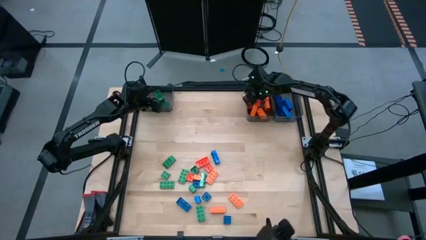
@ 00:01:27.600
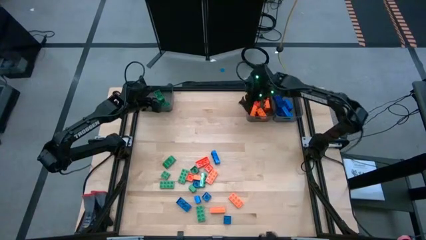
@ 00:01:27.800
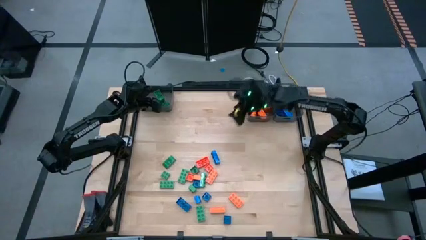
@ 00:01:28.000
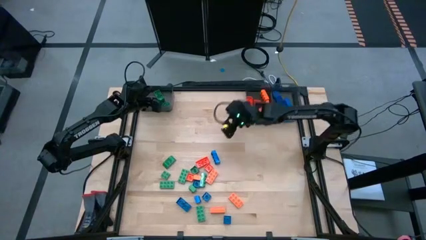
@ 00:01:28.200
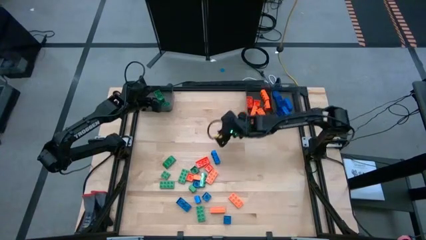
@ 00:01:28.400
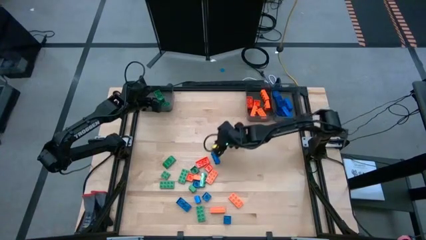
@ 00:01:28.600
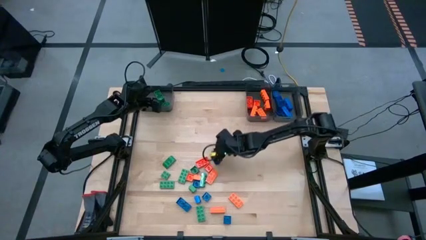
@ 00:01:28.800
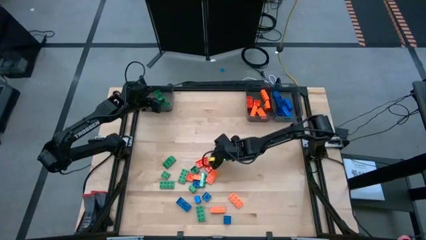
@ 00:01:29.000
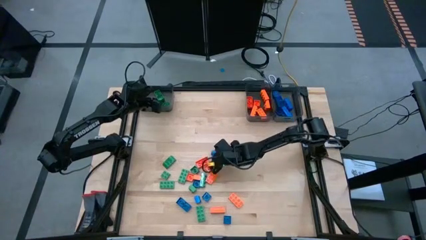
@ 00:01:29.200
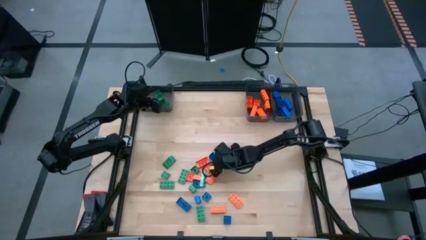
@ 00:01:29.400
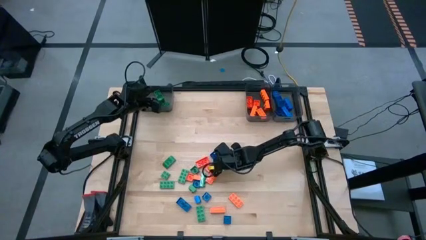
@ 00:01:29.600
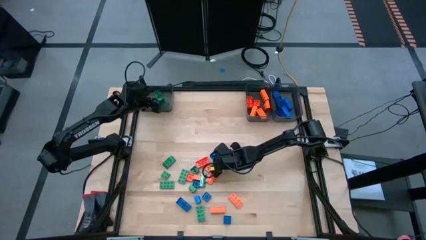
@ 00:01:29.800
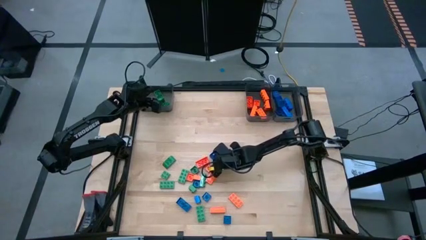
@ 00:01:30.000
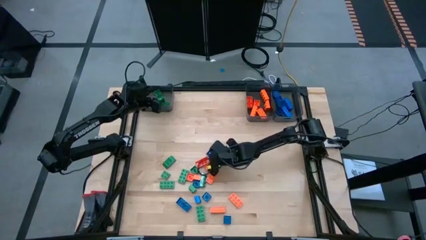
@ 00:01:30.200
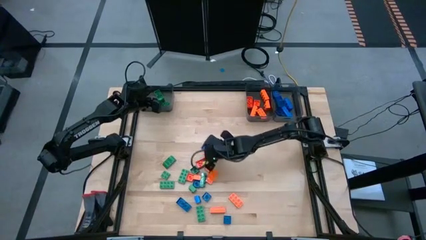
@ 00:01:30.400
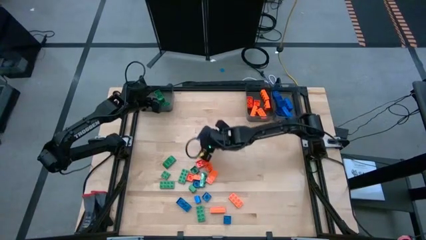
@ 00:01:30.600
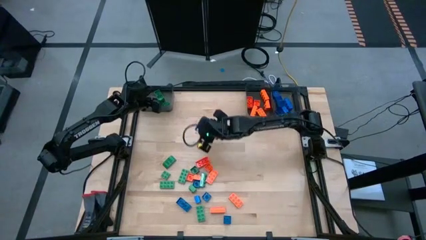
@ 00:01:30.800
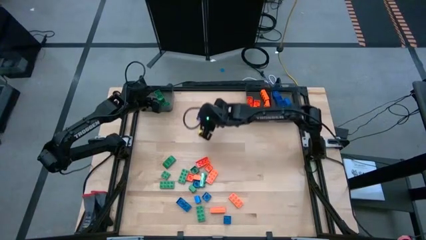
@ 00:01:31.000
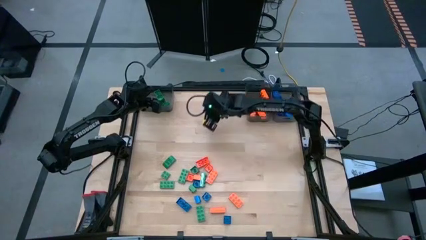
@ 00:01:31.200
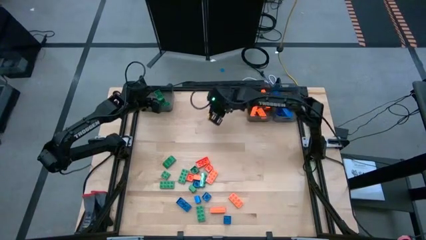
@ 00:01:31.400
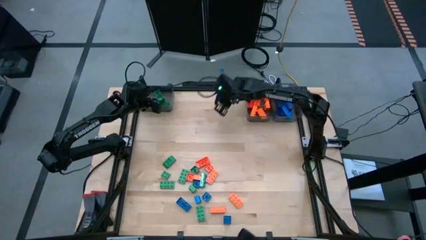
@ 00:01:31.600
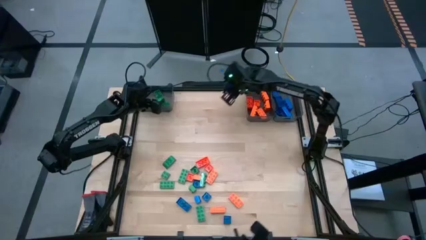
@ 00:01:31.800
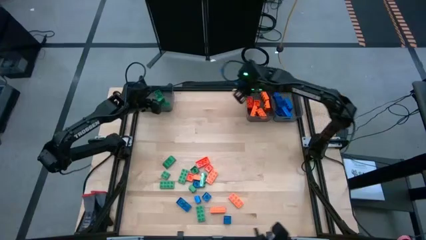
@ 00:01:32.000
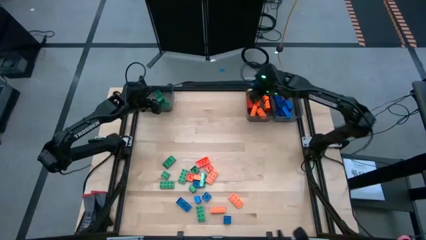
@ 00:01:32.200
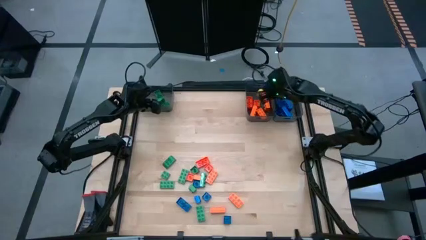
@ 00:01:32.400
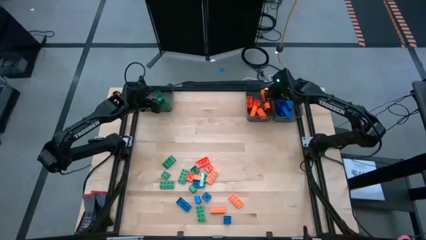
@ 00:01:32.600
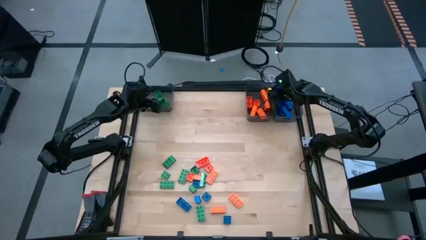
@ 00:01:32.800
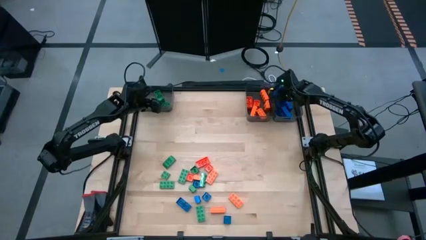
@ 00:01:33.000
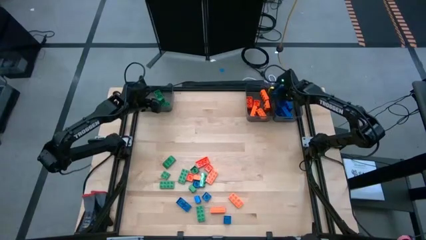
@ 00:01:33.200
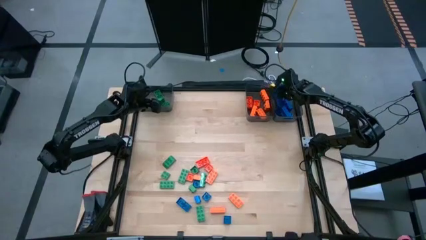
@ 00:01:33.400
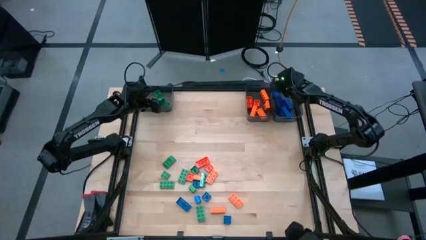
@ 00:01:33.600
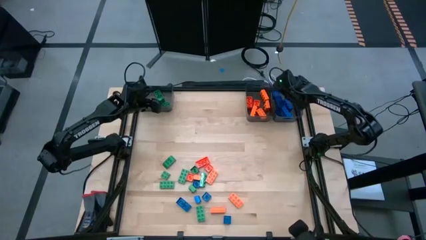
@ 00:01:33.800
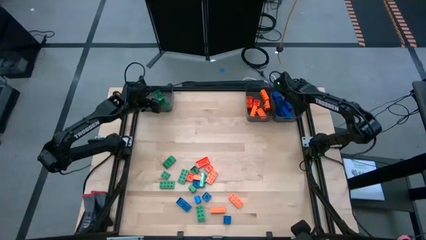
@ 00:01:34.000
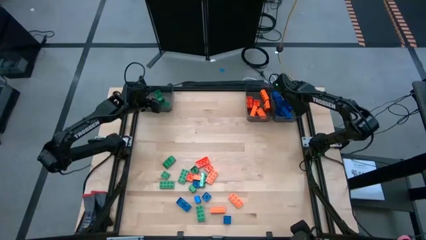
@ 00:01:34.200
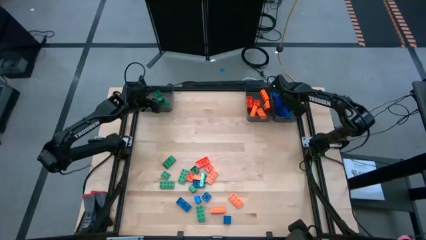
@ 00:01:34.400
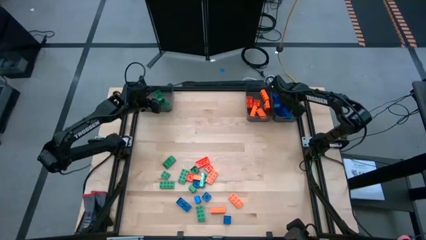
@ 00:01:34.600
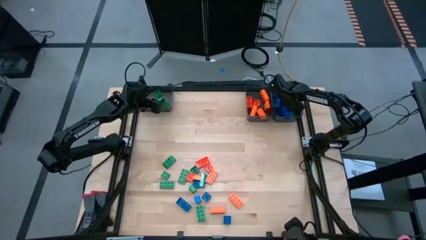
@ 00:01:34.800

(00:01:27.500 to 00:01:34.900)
Task: Sort blocks
Put the blue game piece into the right black bin

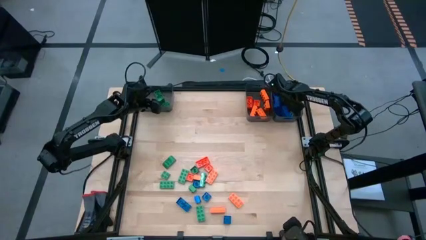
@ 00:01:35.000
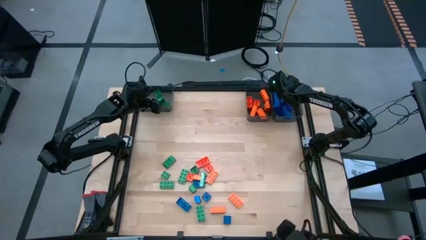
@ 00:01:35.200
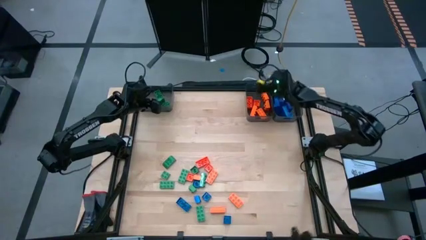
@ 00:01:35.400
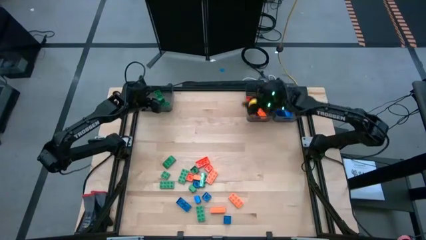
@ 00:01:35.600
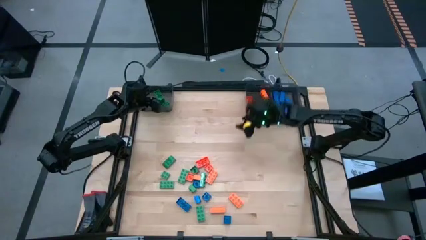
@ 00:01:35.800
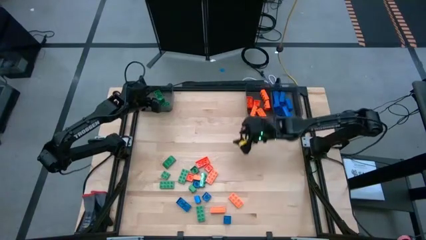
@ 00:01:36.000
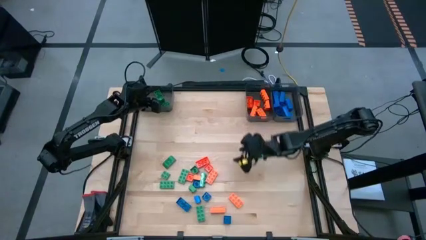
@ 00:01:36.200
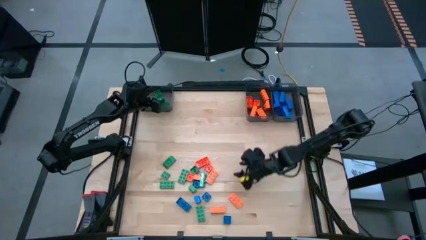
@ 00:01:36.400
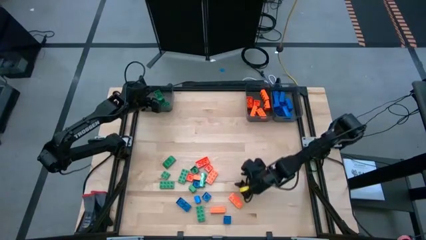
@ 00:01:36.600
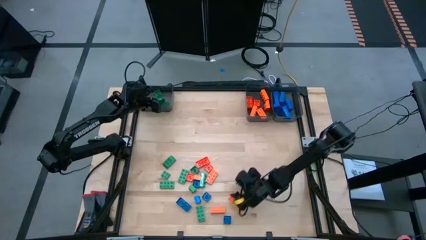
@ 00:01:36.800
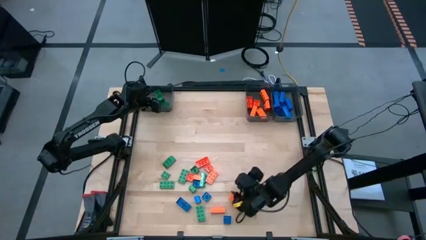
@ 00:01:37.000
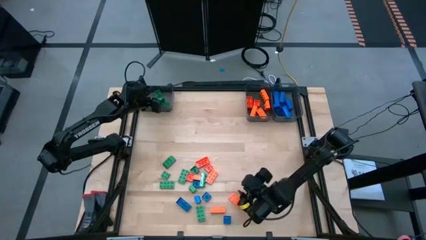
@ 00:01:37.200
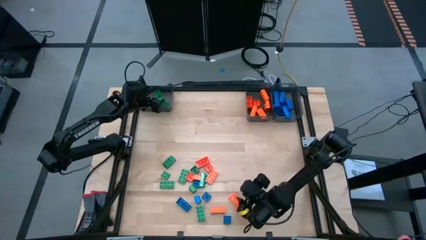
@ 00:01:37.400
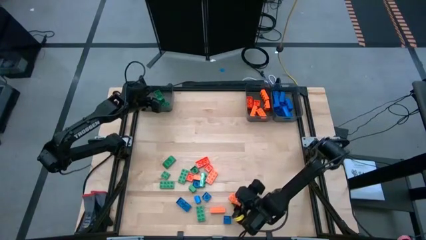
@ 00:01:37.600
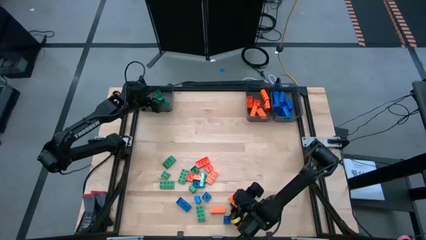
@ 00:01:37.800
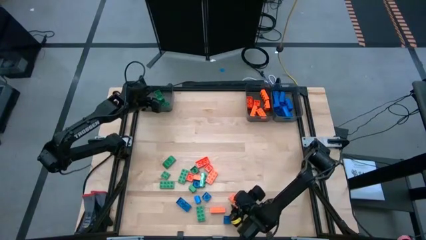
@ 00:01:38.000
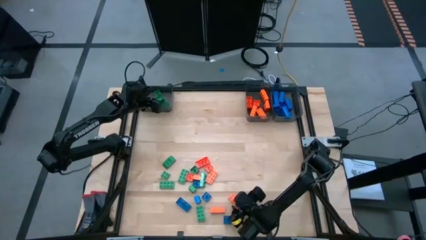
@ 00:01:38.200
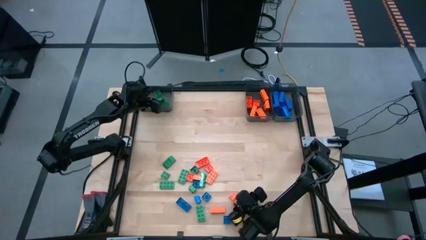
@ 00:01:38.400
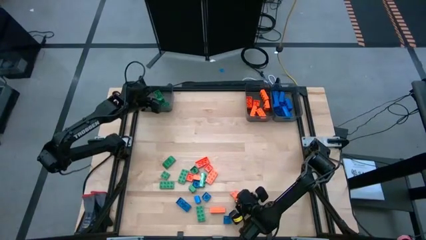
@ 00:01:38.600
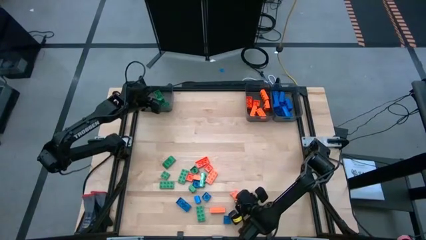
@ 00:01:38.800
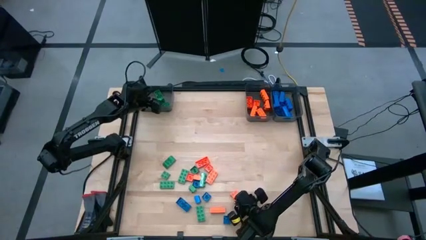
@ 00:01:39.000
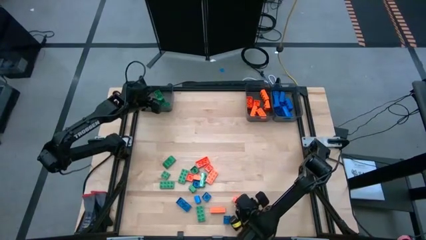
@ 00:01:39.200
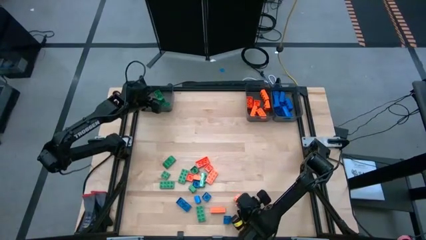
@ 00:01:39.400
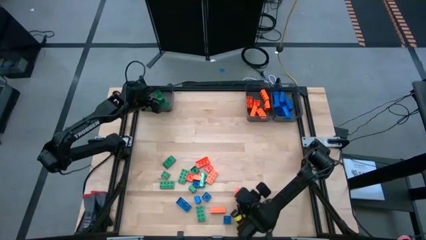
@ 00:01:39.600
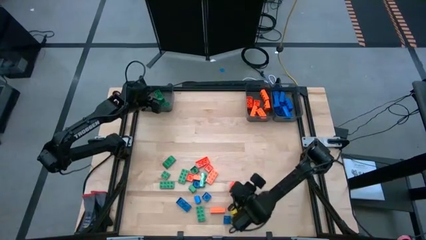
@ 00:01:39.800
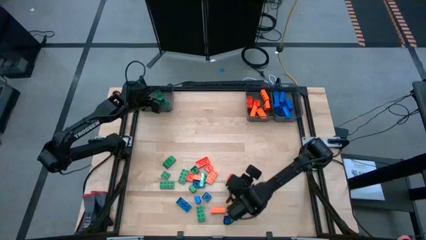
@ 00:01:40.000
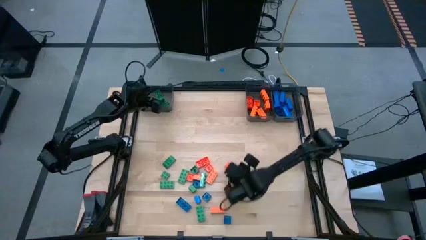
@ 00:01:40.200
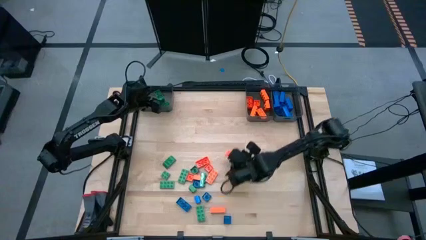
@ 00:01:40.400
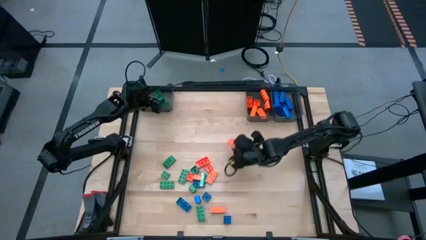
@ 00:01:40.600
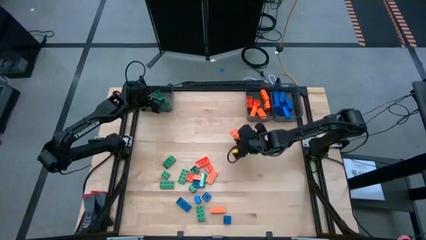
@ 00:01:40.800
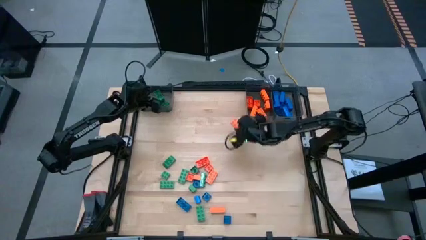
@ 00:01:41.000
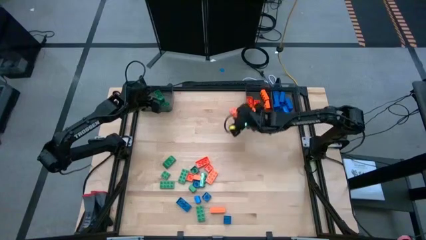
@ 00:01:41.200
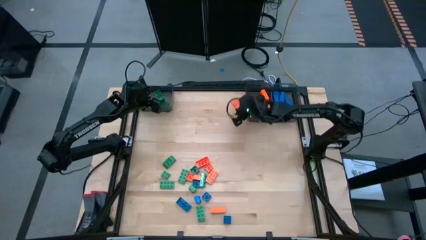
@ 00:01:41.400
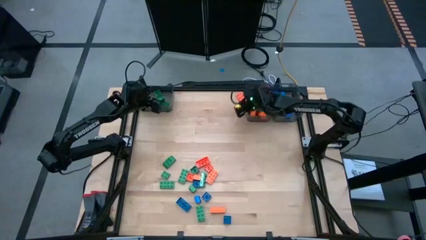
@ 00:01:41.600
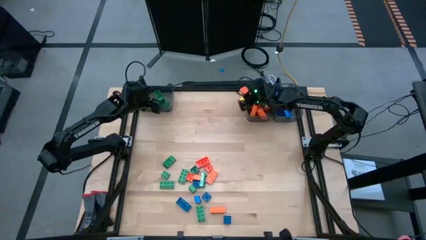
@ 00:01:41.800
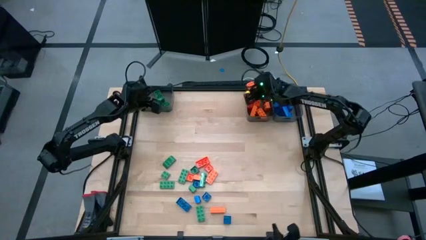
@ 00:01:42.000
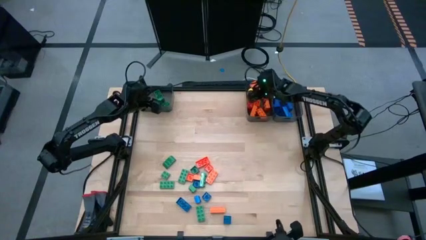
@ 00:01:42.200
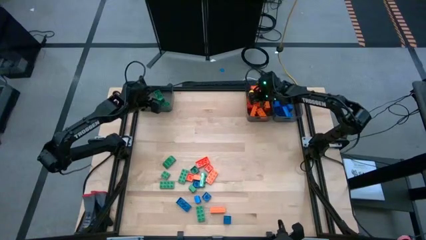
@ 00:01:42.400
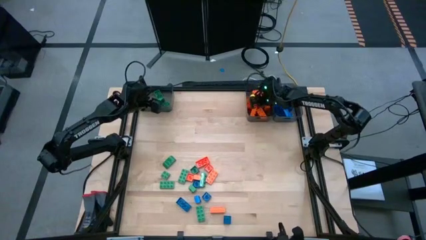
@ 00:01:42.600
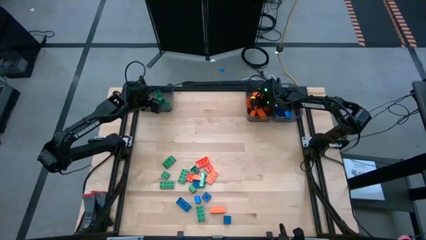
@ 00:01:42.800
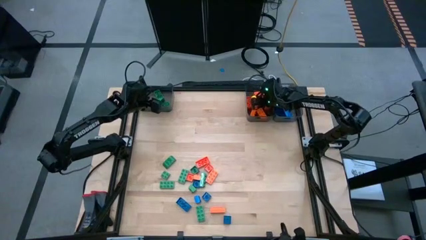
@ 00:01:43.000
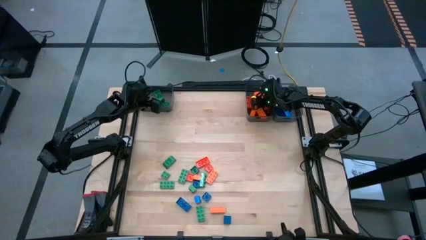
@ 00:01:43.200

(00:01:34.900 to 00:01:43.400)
Put the orange game piece into the middle black bin
